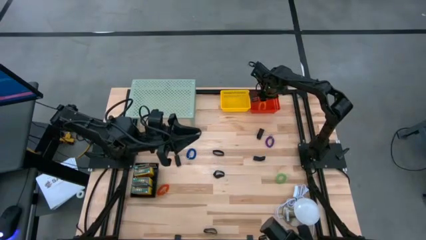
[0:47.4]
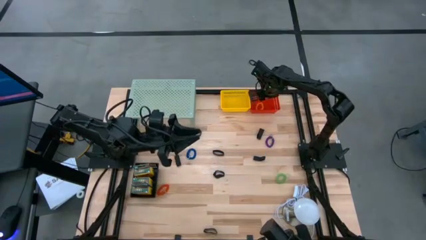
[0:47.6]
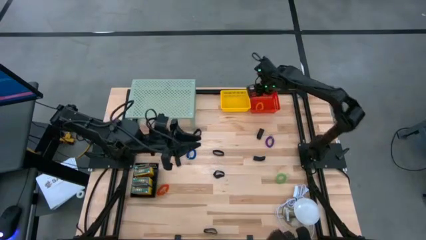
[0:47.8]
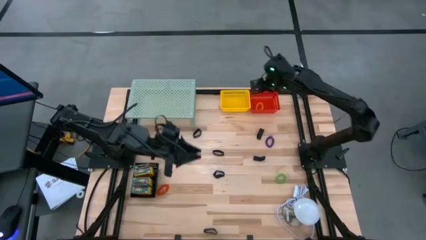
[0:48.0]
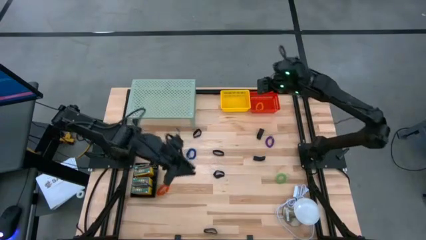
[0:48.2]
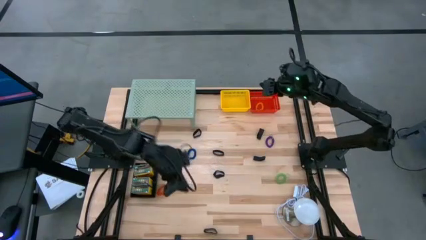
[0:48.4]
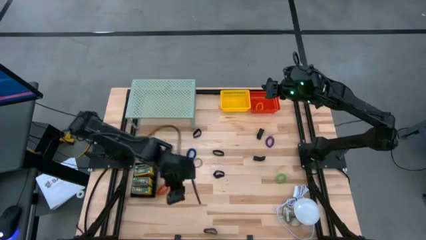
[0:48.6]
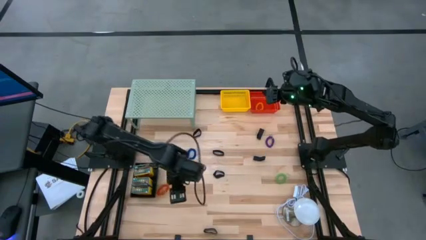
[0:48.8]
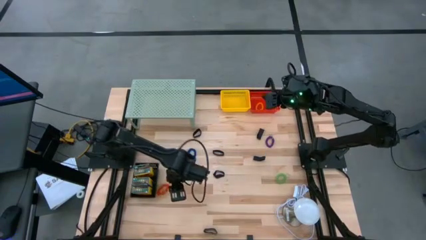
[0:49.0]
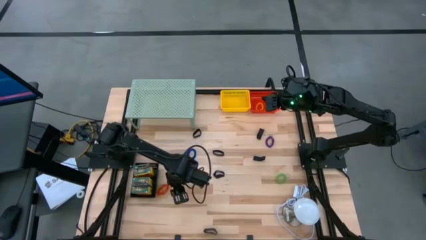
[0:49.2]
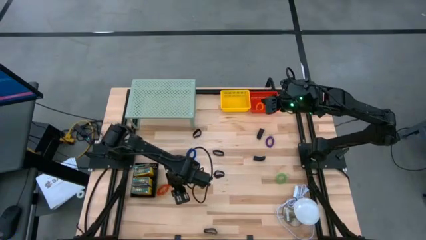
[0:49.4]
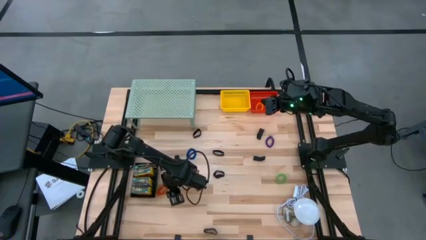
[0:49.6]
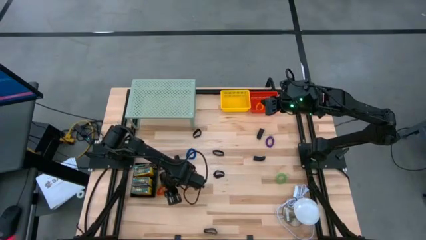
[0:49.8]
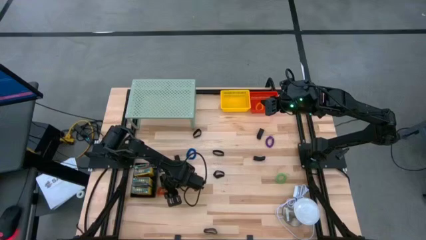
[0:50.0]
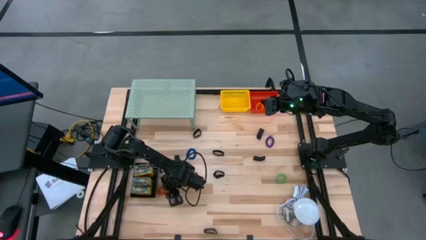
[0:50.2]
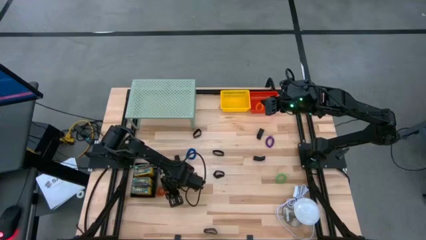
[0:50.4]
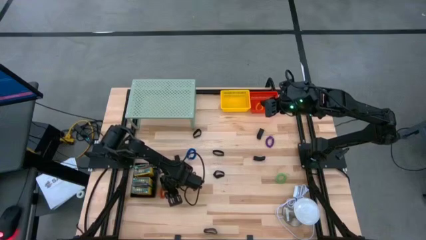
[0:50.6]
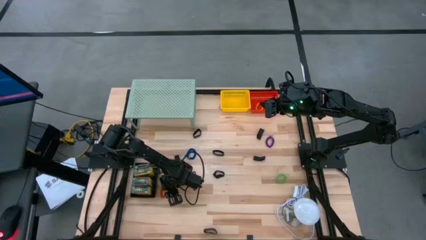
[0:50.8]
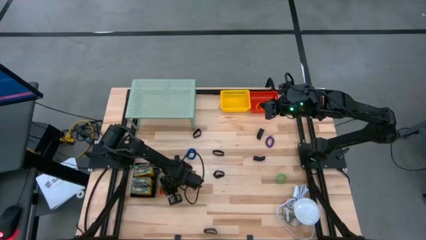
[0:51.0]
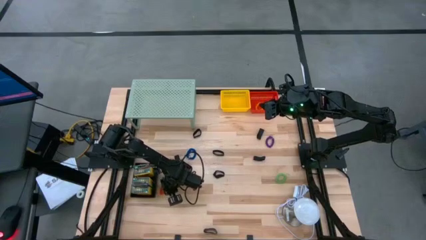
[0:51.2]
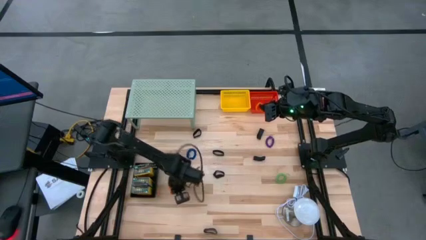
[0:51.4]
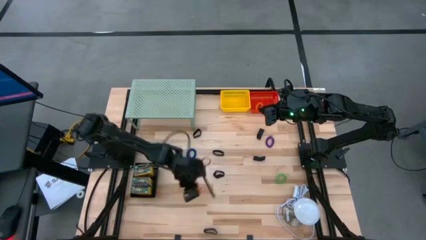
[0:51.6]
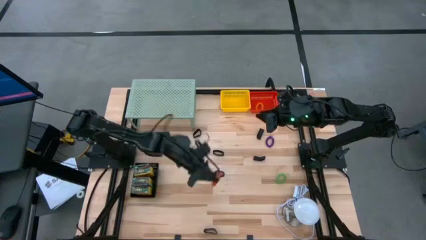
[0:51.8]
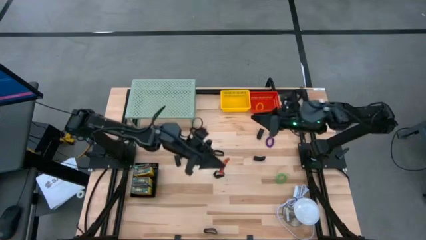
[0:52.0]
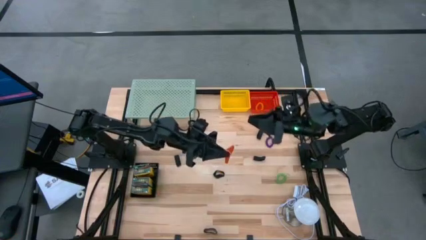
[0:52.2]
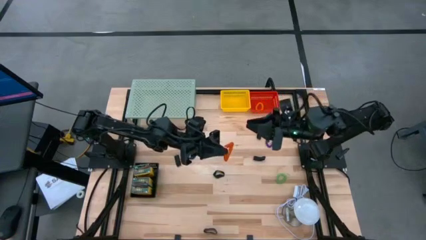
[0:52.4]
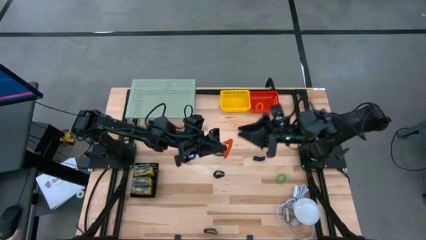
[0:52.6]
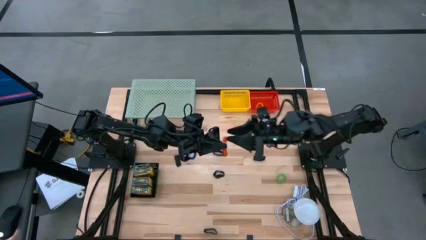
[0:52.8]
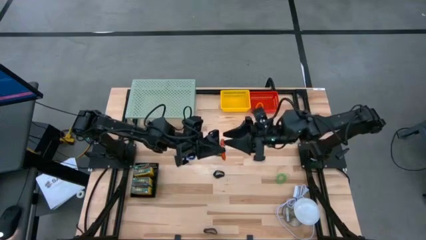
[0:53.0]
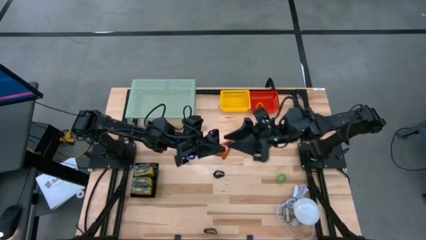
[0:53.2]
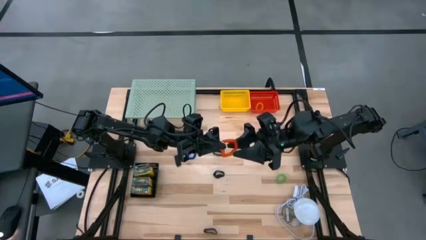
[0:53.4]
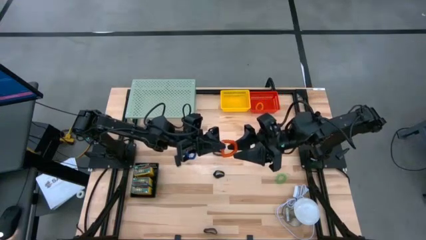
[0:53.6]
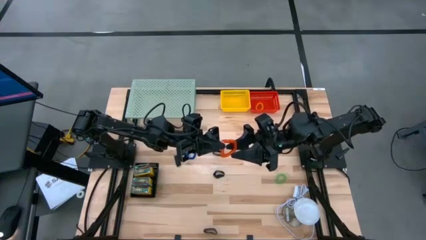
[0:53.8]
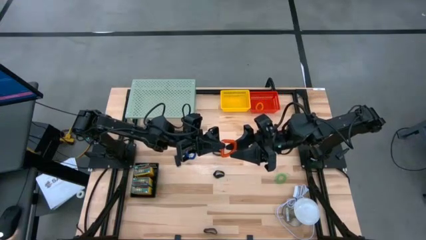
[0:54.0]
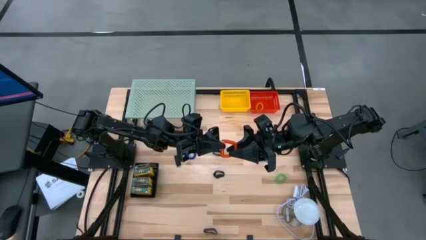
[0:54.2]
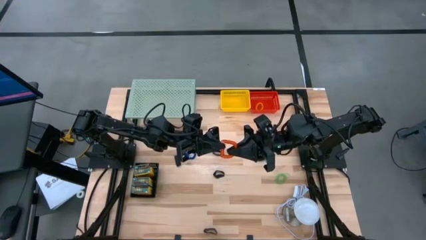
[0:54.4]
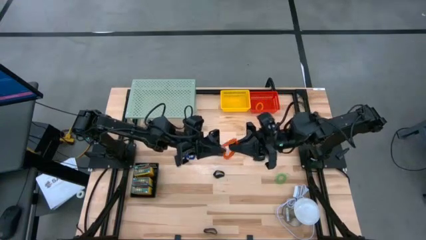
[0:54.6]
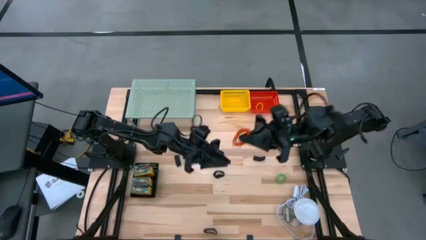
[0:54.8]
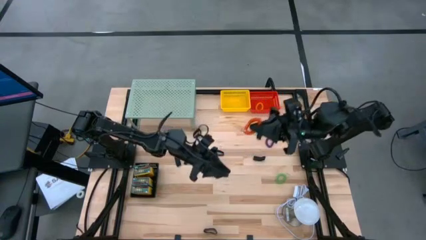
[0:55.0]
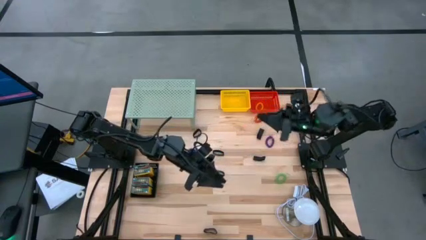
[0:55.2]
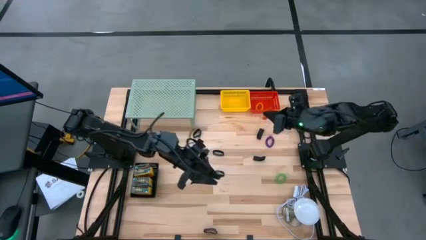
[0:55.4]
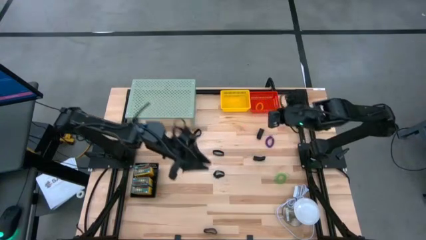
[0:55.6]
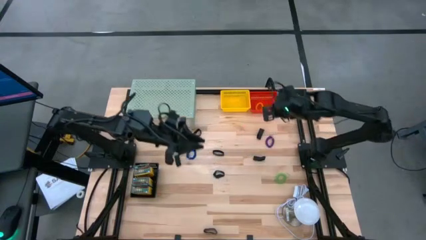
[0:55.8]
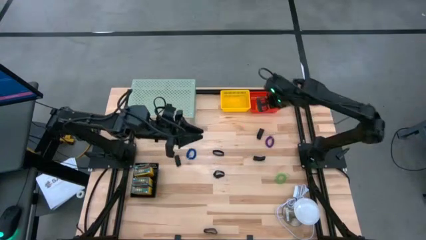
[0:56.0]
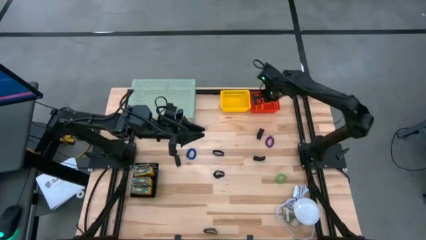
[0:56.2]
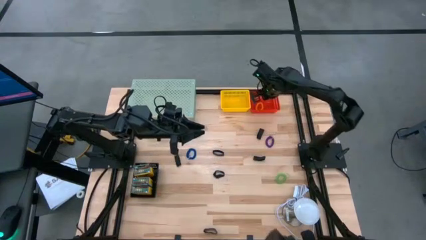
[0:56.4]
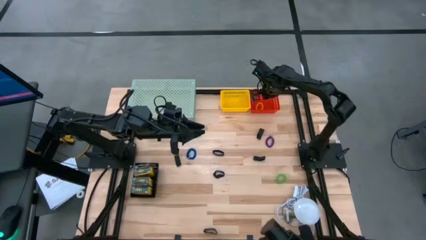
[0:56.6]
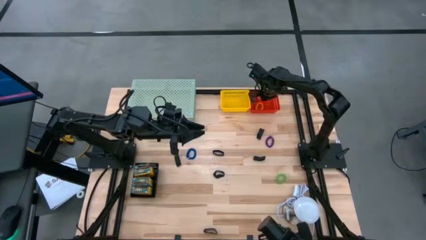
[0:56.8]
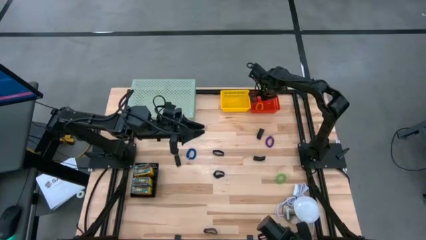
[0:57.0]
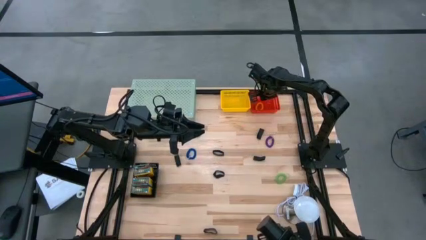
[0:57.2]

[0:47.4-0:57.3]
Task: Pick & Place Office Desk Supplies
Put the red spring keychain into the red basket

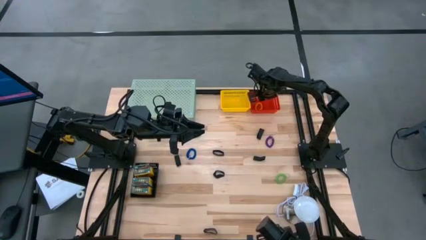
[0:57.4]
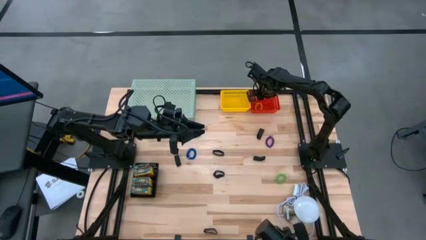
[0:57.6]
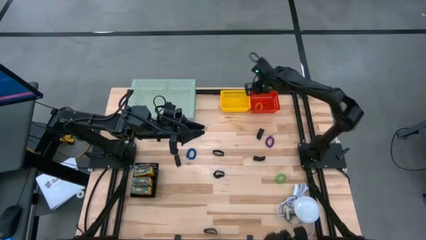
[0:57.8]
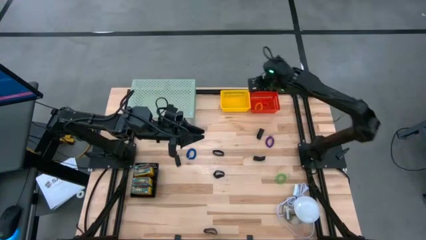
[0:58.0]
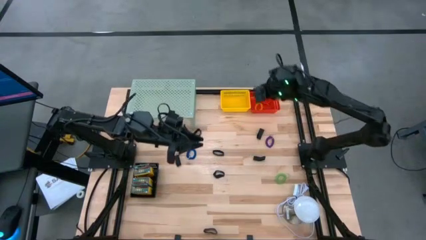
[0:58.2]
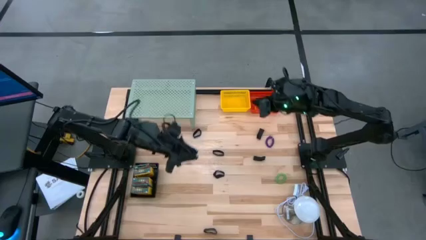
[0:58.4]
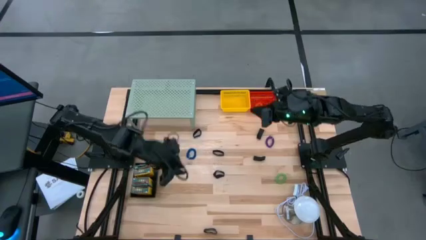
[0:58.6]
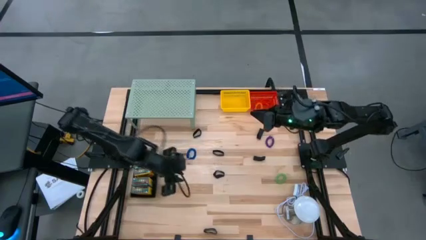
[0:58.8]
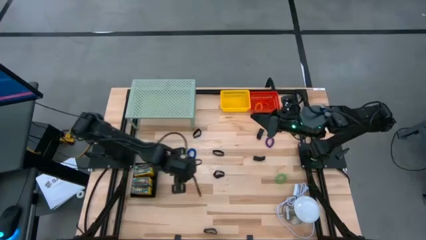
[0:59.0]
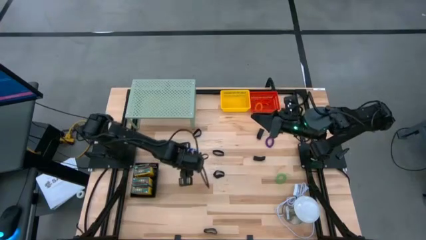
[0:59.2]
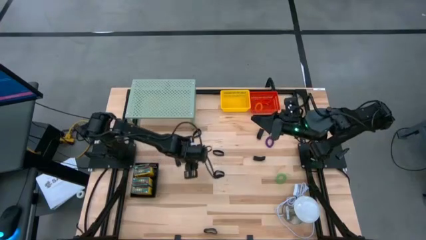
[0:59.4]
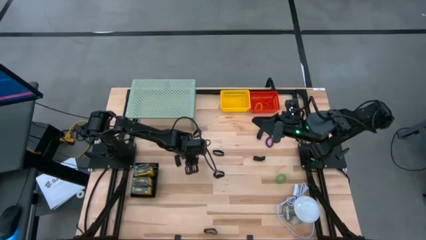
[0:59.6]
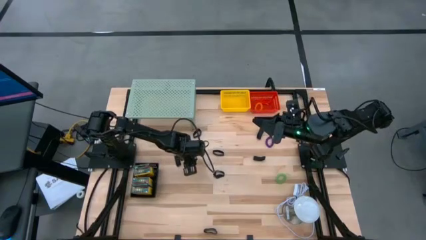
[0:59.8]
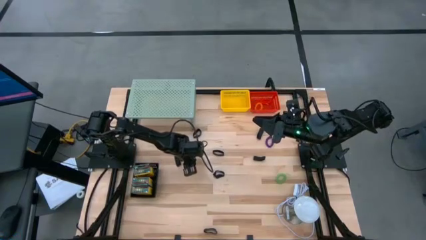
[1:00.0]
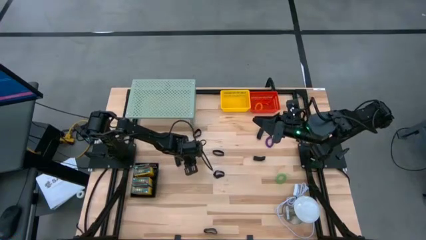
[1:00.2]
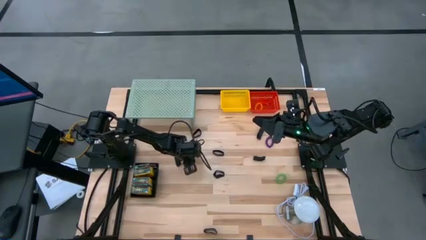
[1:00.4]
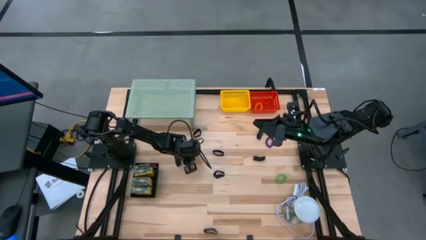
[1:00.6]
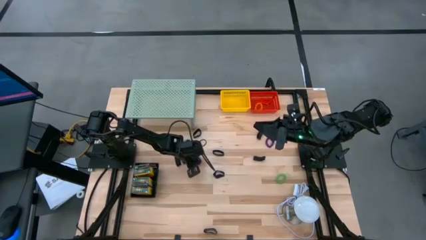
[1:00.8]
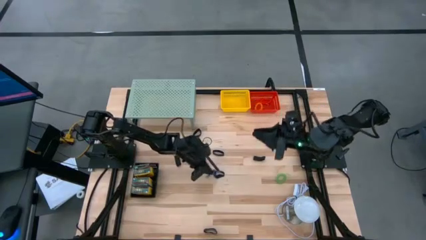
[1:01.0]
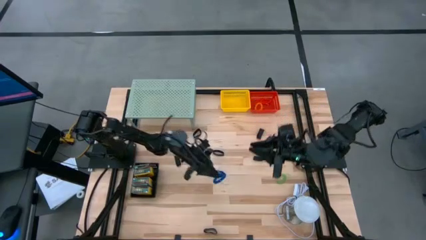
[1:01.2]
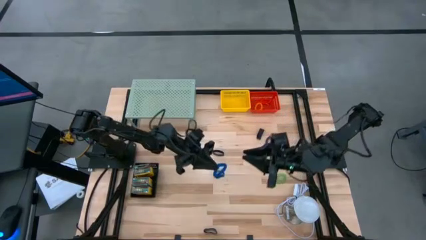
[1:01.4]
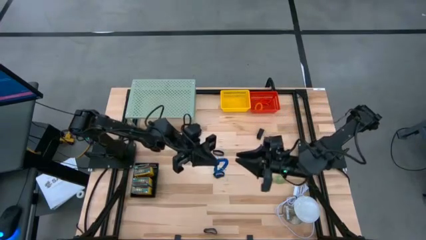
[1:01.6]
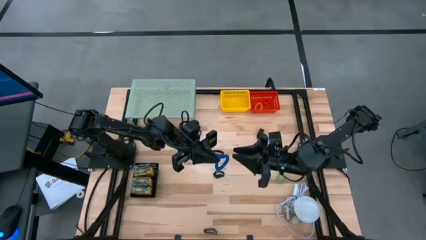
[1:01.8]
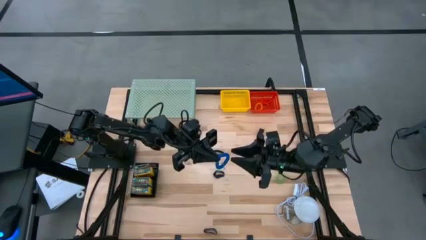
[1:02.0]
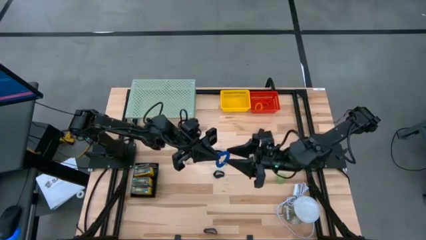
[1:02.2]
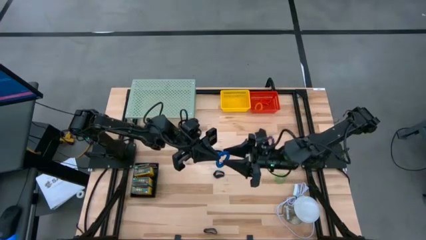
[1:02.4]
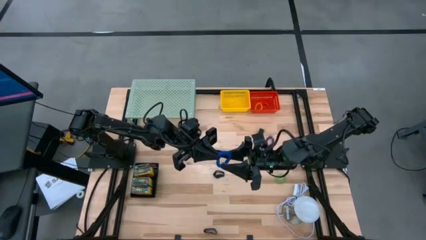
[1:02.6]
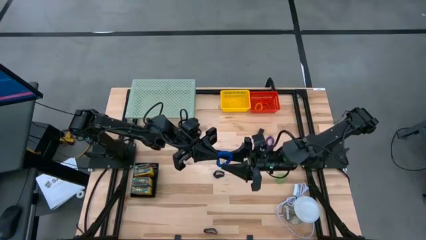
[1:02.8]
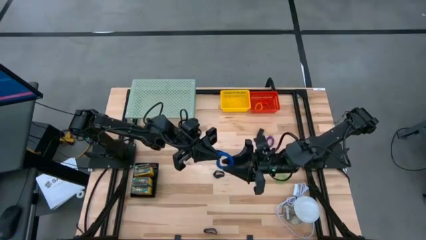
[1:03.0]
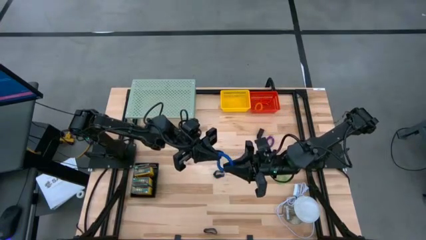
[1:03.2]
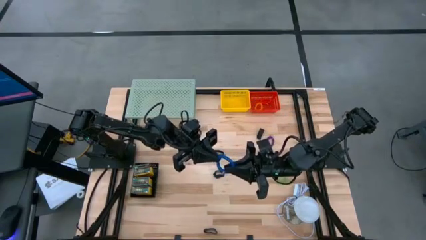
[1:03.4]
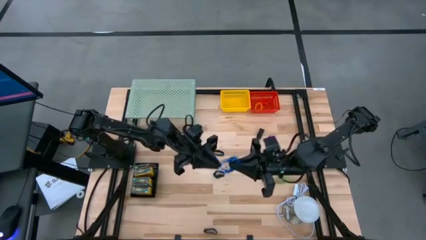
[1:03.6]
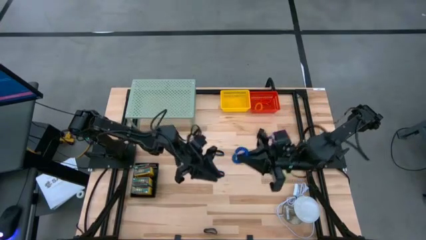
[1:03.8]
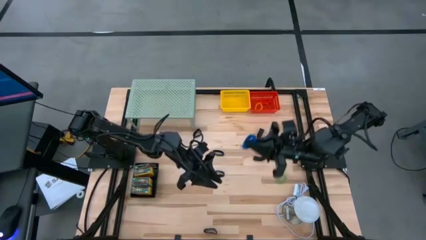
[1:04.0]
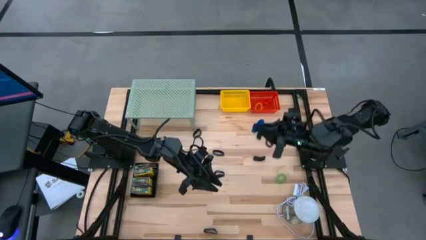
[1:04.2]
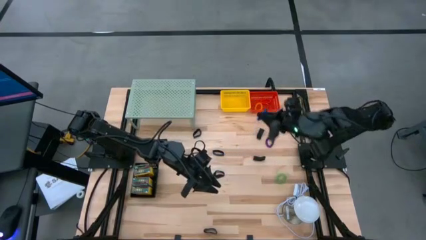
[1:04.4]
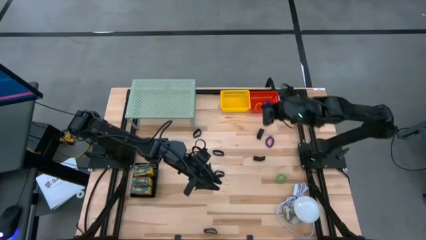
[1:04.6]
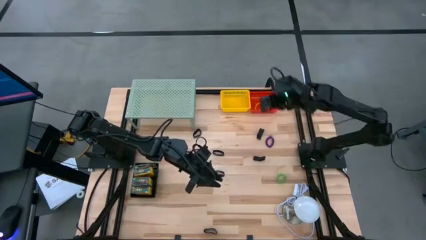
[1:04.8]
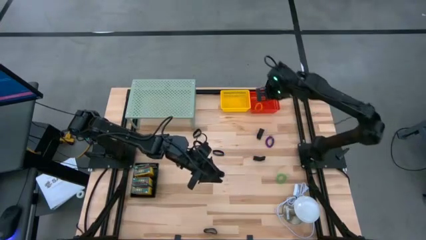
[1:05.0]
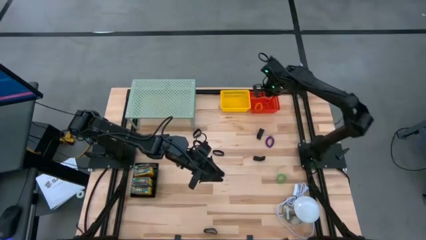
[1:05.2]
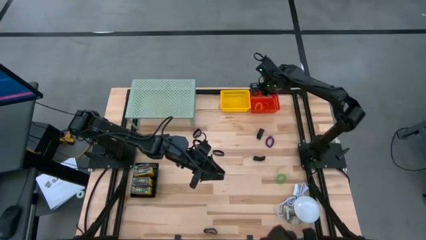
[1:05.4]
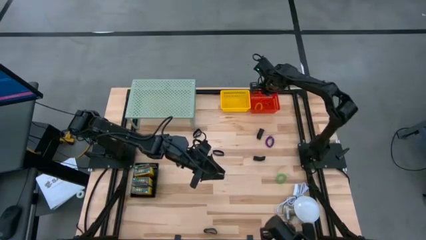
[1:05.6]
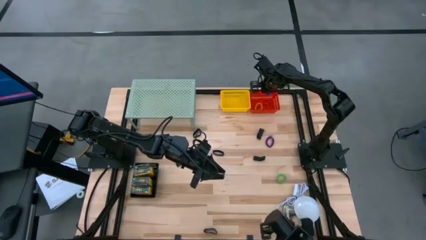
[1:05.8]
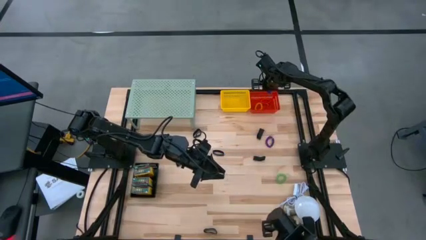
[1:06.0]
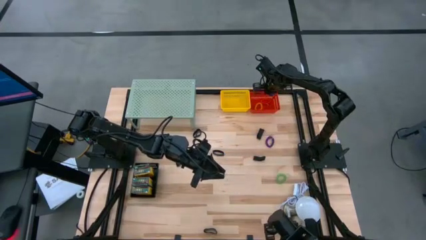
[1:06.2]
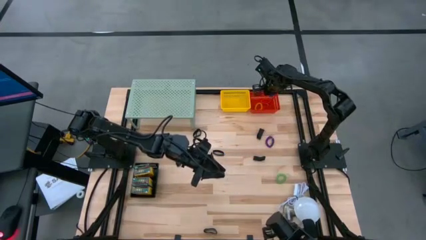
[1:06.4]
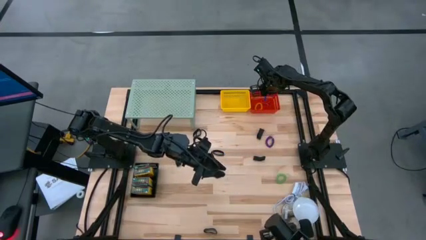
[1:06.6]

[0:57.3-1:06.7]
Put the blue spring keychain into the red basket
